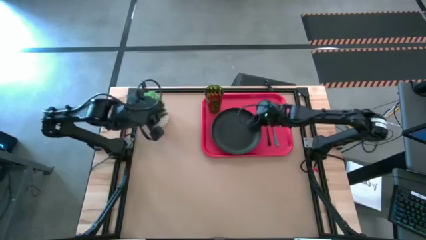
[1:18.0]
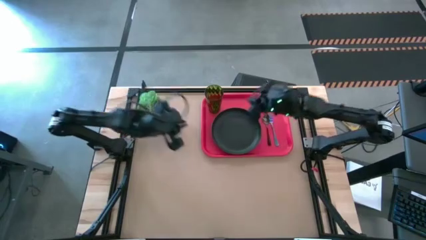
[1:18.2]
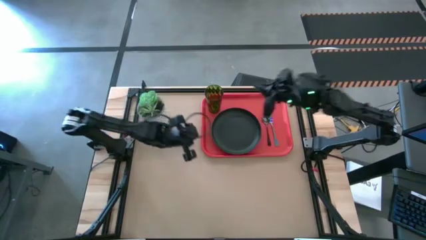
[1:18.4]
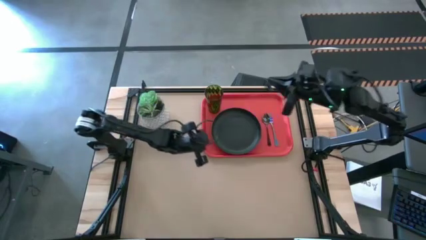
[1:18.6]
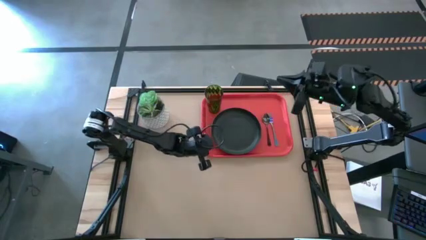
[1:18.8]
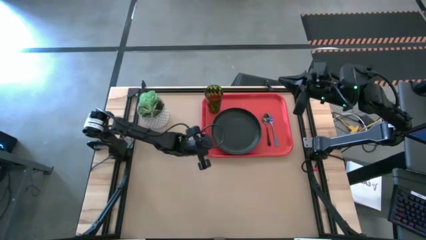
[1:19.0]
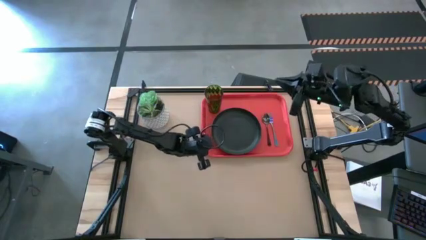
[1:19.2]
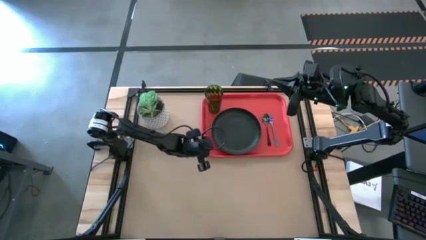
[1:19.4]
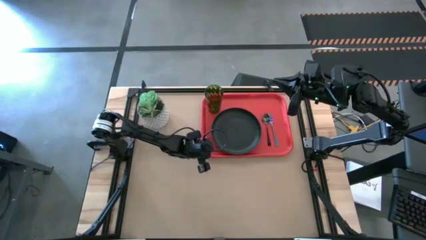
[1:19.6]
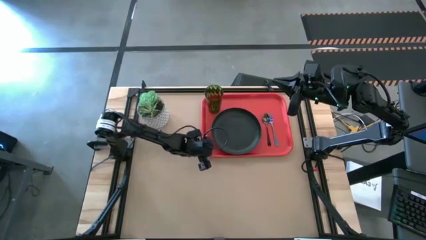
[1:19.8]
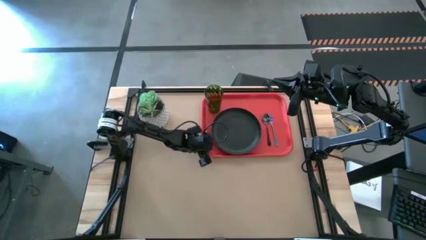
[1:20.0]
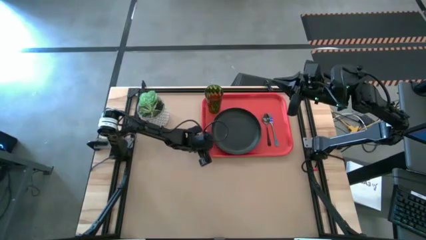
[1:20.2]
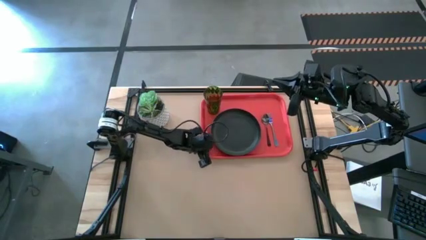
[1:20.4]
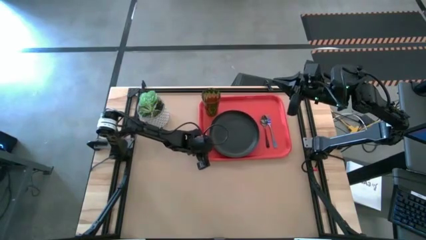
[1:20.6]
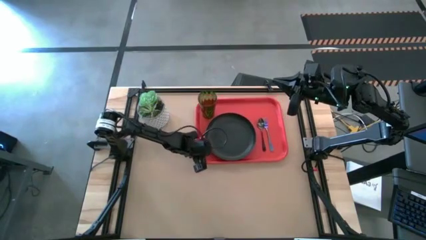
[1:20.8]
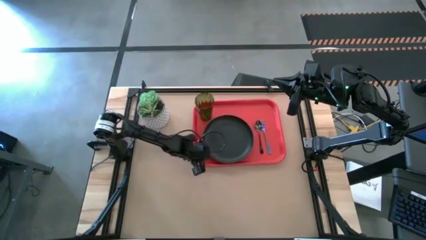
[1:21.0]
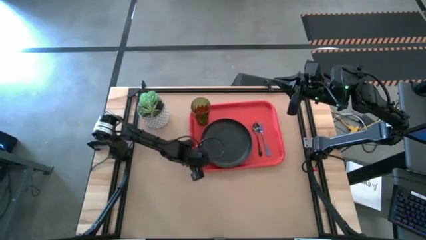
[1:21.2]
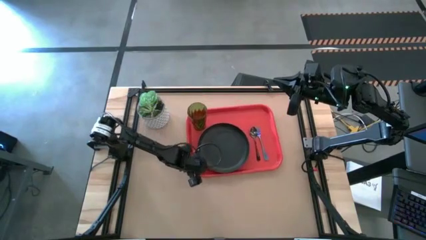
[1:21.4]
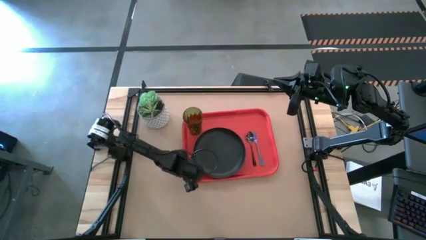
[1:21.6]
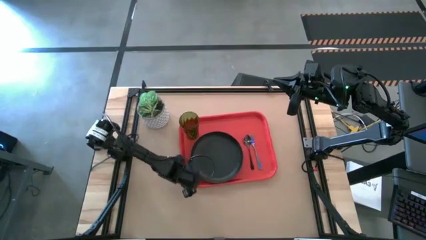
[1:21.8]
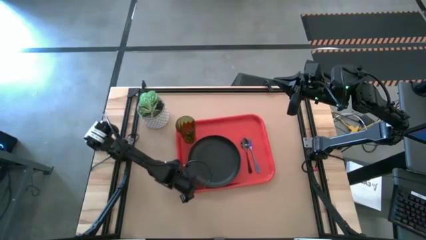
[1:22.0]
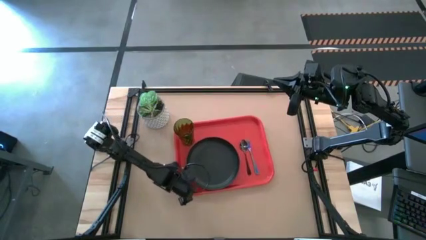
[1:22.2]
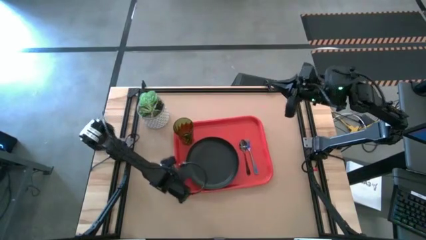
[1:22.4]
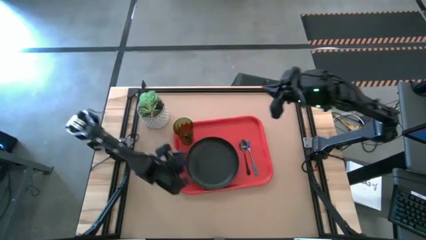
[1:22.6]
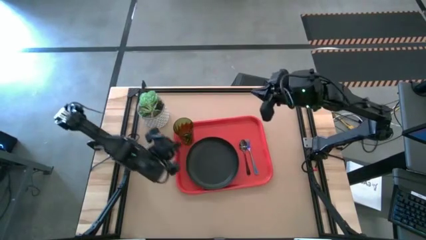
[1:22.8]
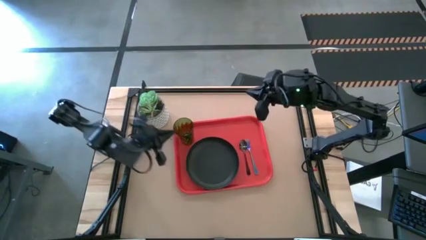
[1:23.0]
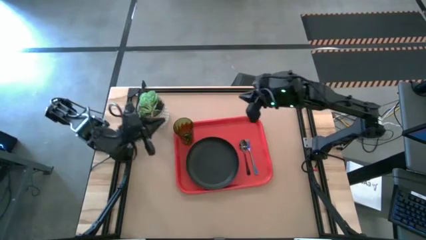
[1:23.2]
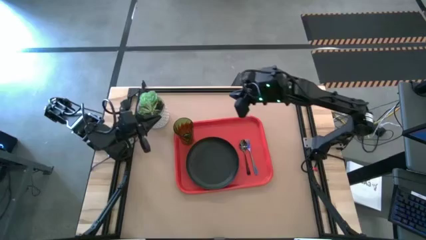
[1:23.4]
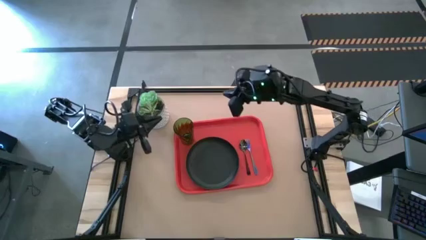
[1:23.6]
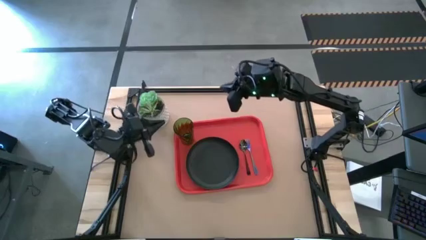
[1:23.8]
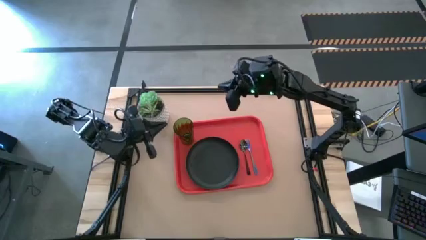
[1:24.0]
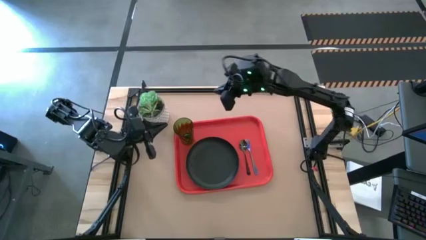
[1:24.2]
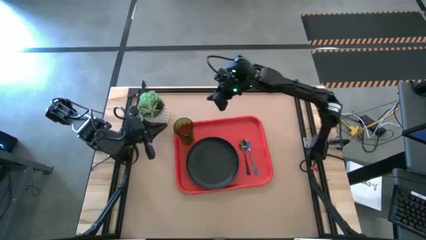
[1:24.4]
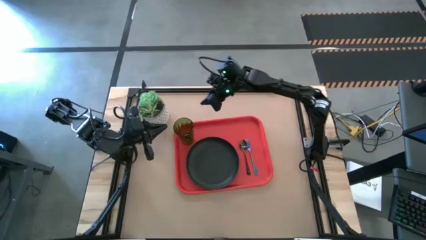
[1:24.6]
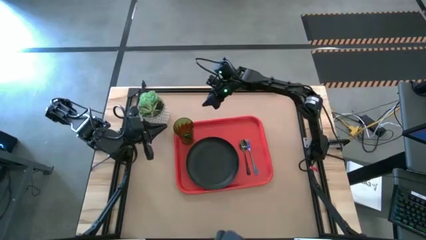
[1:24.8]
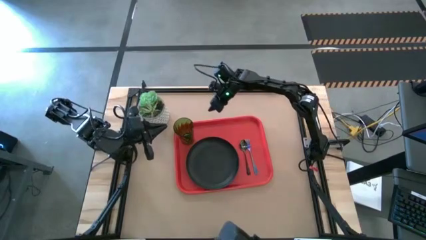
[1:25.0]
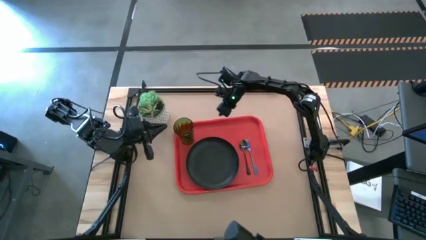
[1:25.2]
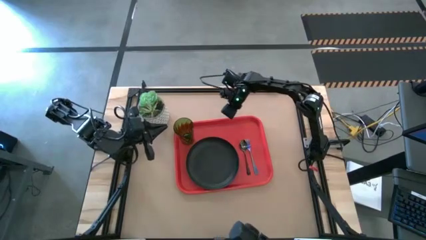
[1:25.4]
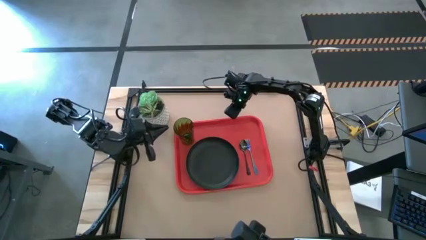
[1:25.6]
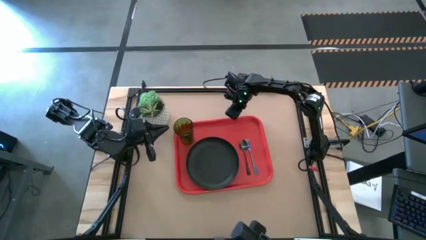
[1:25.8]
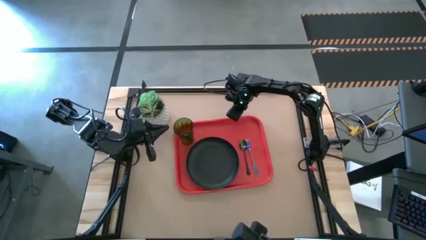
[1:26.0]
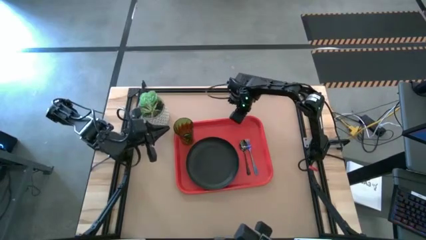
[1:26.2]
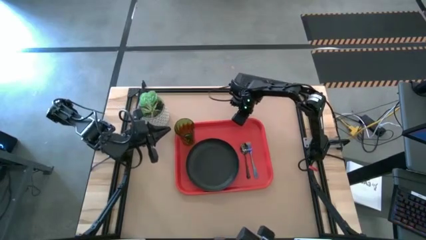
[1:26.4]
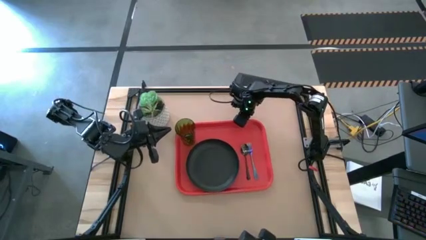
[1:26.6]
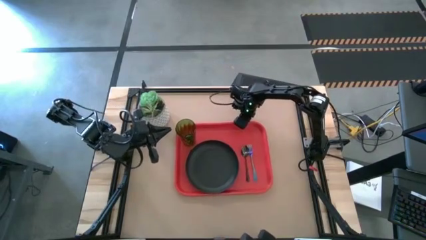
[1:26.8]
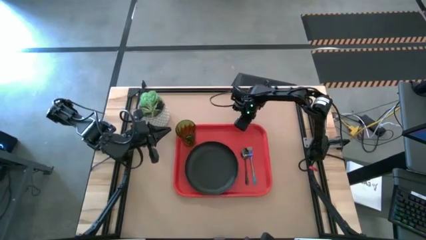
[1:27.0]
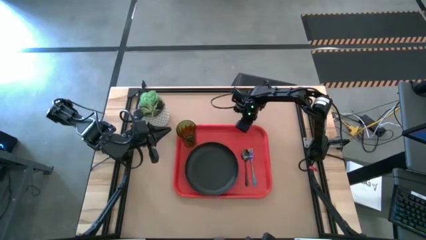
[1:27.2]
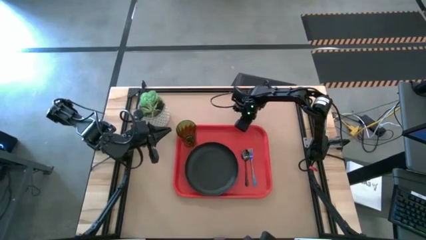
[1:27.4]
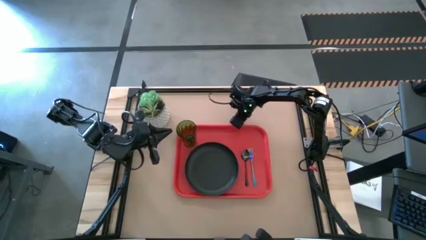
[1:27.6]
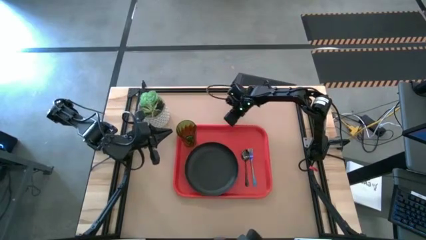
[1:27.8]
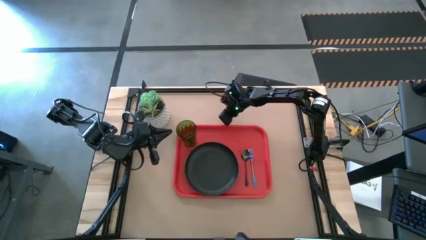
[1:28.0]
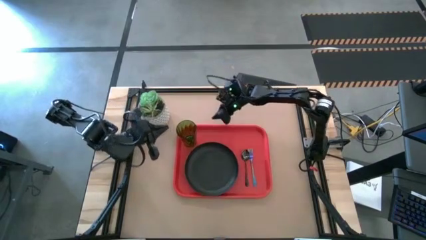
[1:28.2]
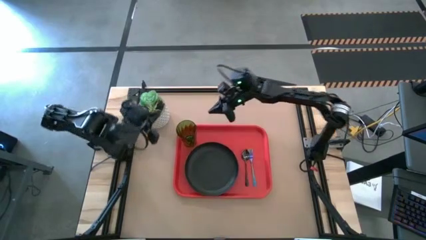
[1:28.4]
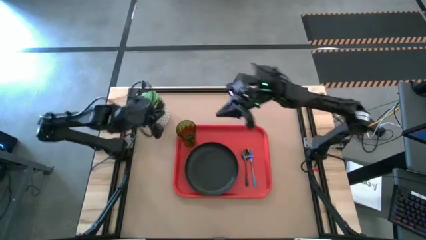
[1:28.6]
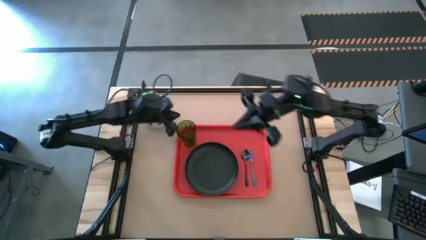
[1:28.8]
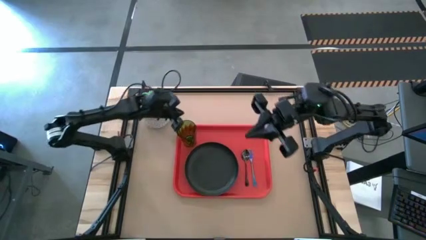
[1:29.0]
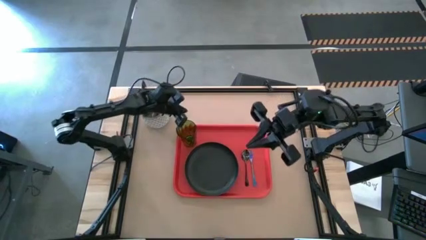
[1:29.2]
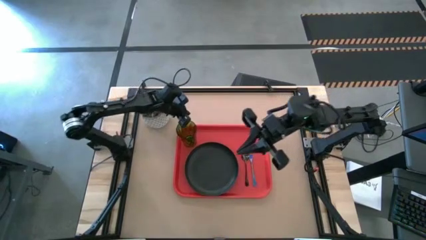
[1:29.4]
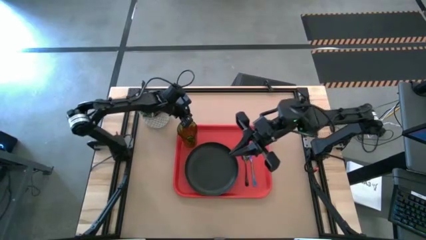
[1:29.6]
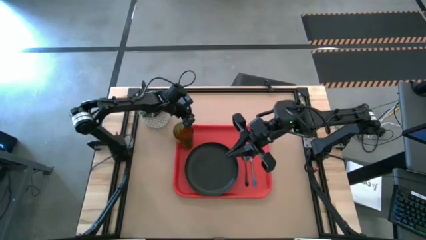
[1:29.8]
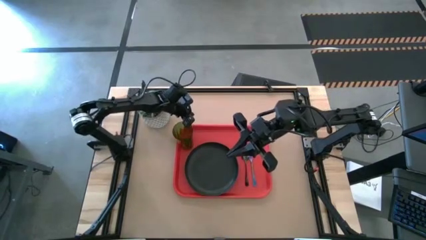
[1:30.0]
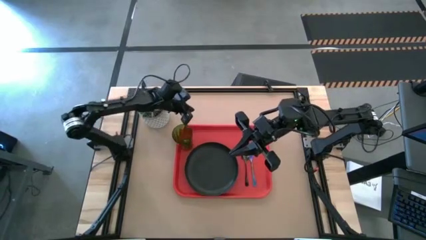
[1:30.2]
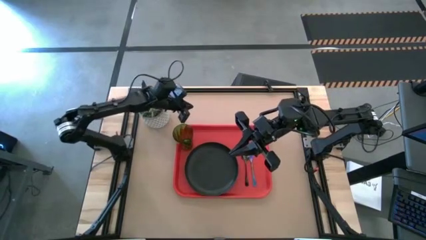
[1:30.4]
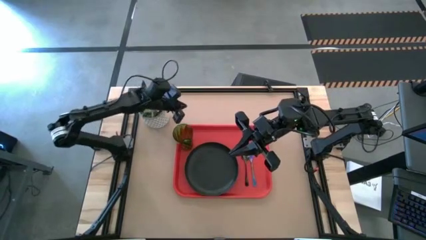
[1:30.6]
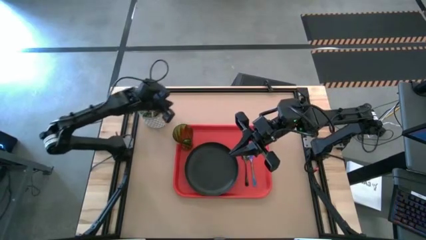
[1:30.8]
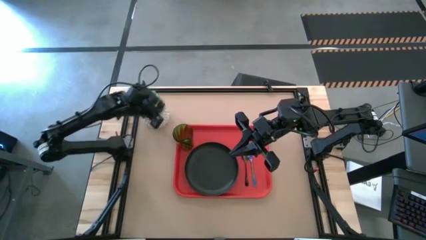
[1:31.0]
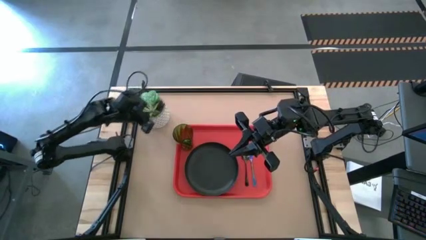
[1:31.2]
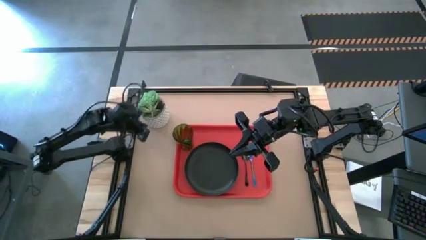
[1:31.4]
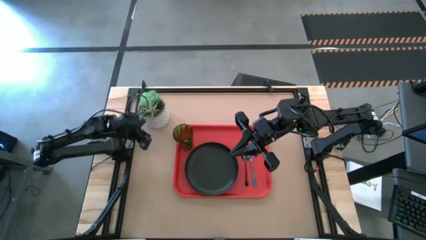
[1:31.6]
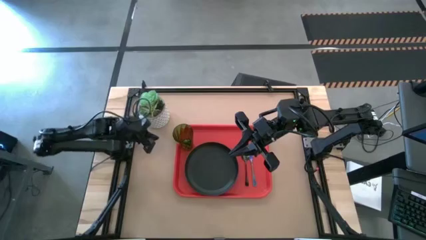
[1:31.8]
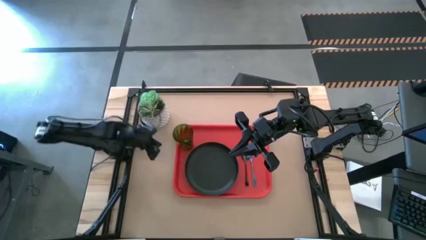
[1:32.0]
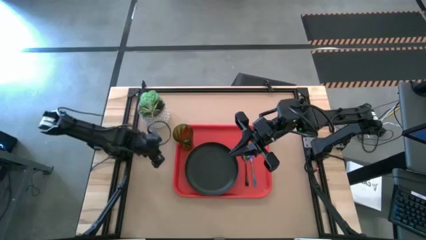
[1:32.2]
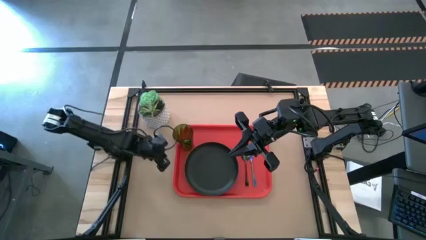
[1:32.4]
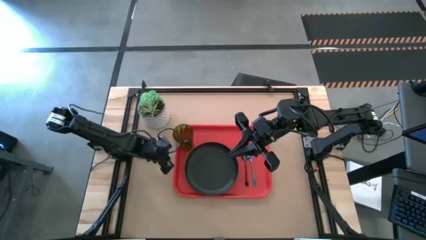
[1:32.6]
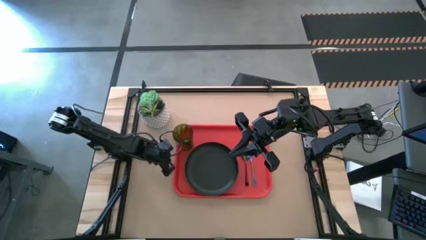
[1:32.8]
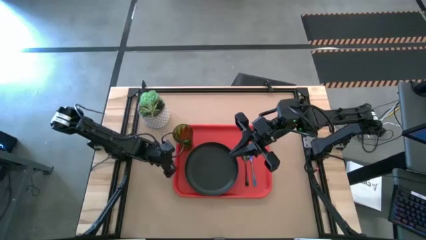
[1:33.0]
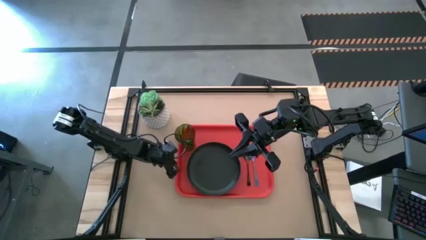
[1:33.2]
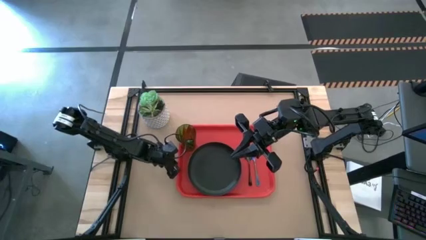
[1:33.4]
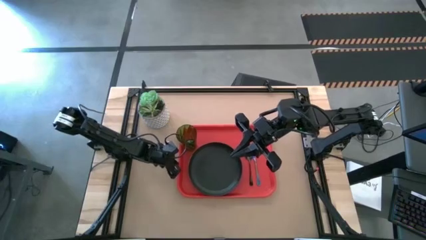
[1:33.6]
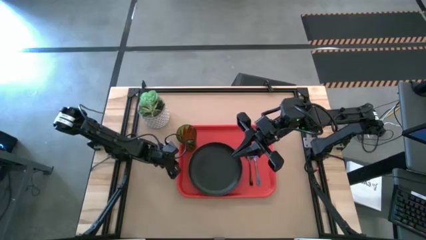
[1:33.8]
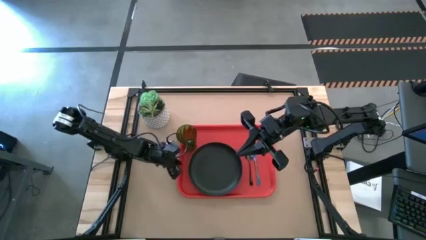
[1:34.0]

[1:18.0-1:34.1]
Task: Pick and place plate/cup/fork/spoon on tray
Move the red tray to the center of the table
